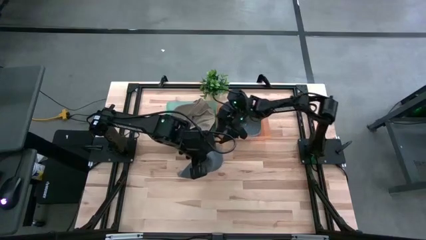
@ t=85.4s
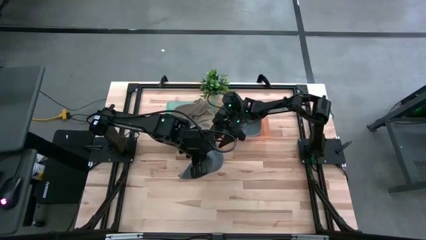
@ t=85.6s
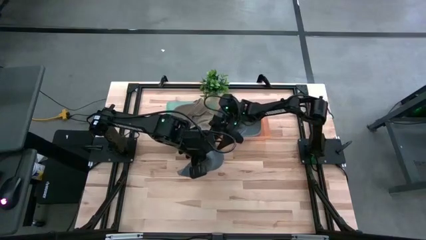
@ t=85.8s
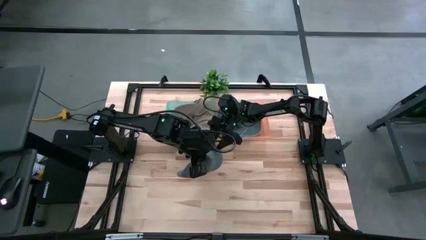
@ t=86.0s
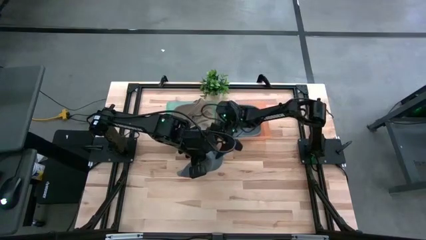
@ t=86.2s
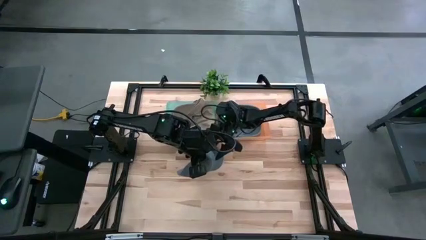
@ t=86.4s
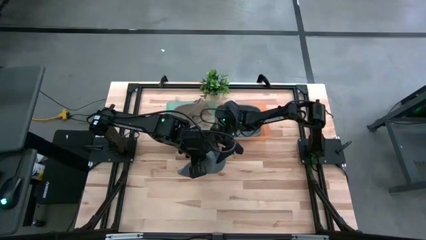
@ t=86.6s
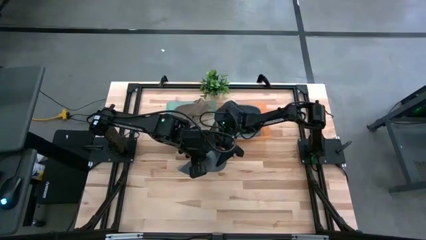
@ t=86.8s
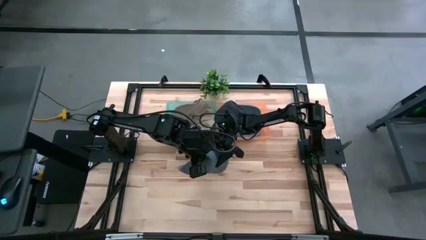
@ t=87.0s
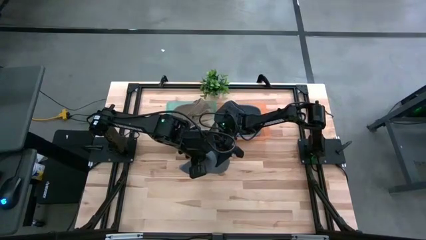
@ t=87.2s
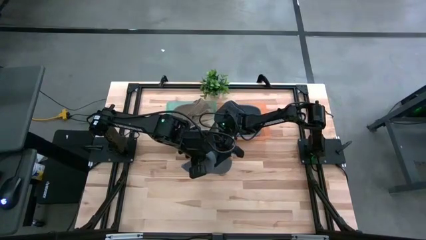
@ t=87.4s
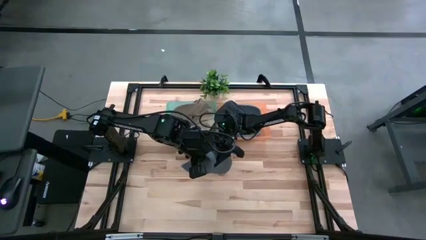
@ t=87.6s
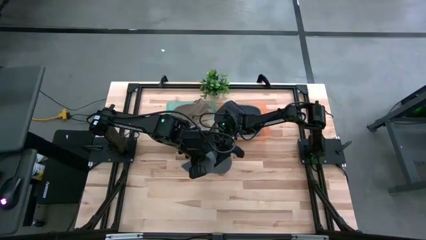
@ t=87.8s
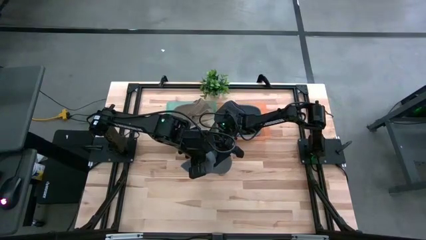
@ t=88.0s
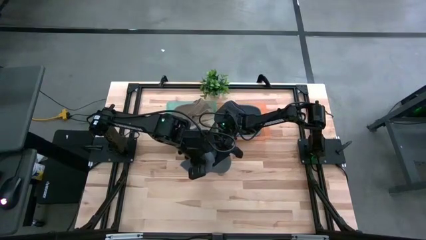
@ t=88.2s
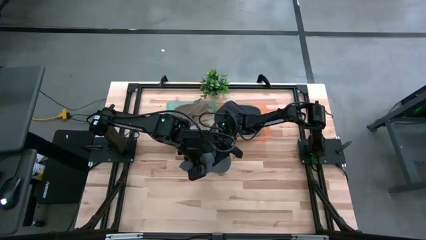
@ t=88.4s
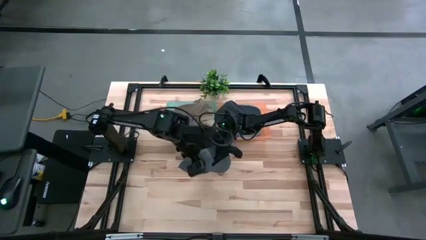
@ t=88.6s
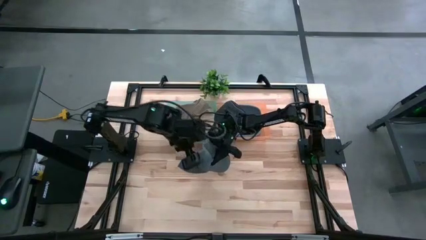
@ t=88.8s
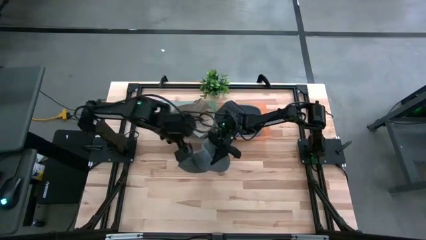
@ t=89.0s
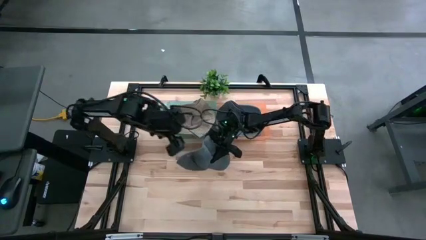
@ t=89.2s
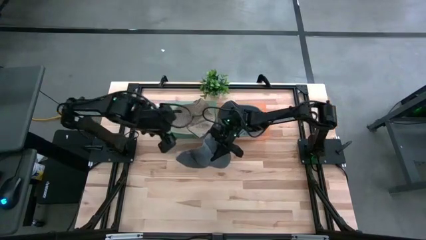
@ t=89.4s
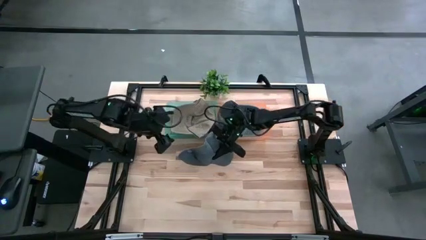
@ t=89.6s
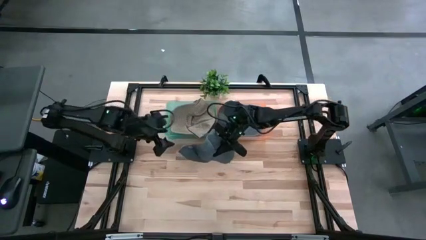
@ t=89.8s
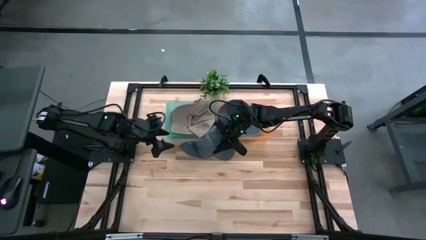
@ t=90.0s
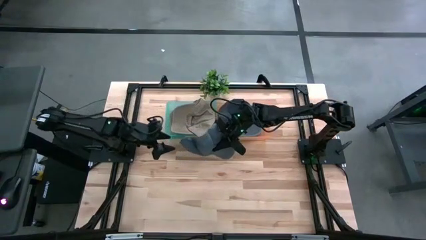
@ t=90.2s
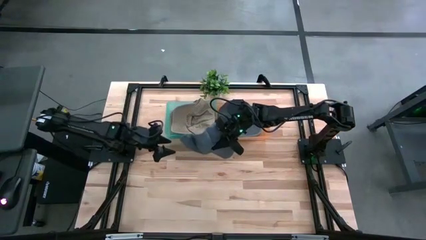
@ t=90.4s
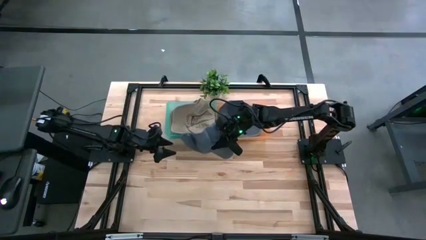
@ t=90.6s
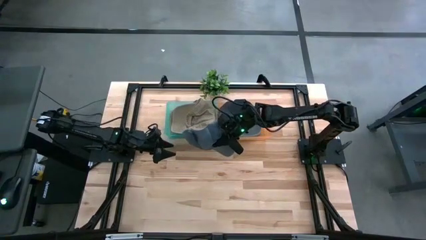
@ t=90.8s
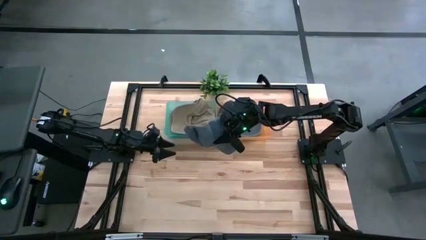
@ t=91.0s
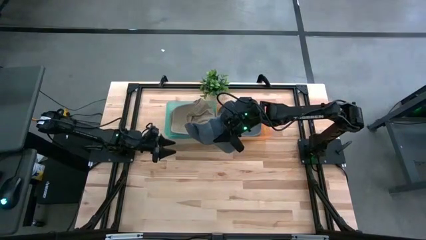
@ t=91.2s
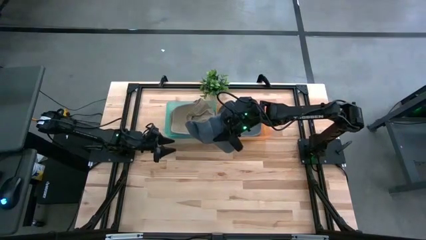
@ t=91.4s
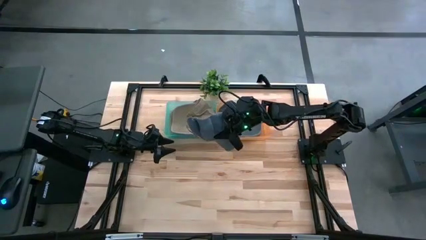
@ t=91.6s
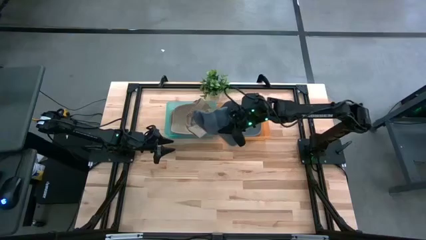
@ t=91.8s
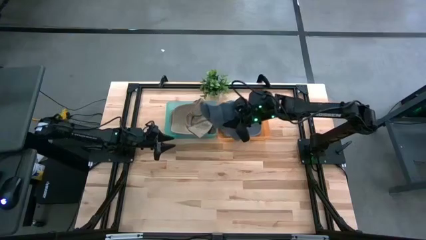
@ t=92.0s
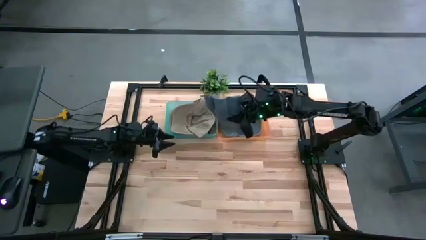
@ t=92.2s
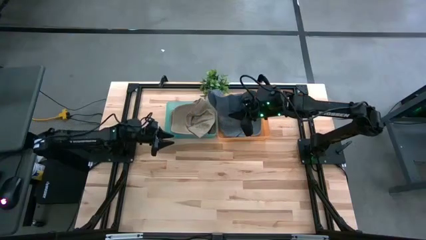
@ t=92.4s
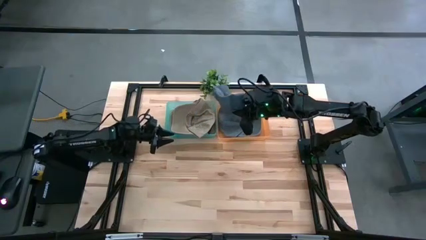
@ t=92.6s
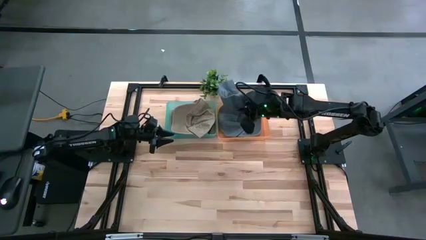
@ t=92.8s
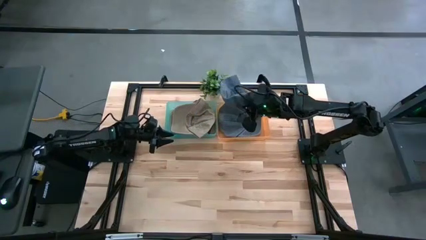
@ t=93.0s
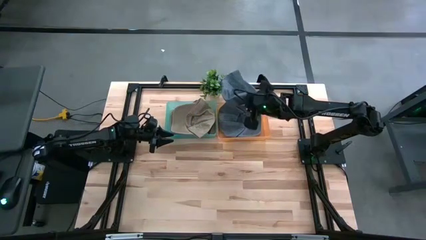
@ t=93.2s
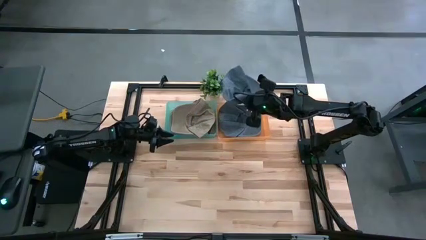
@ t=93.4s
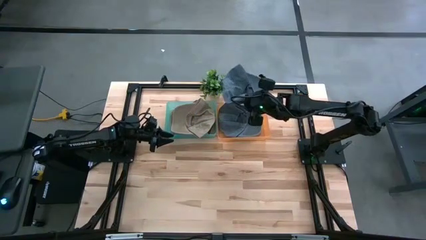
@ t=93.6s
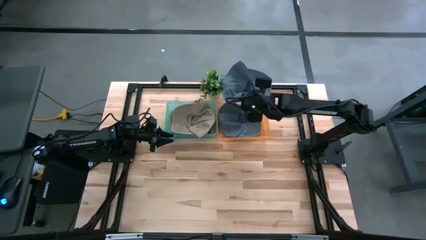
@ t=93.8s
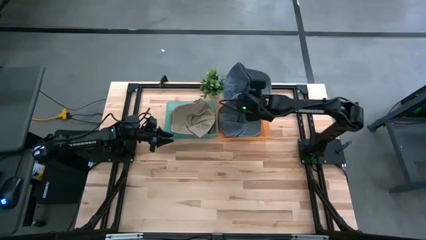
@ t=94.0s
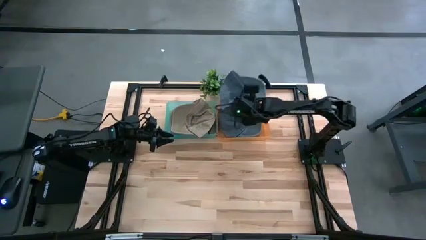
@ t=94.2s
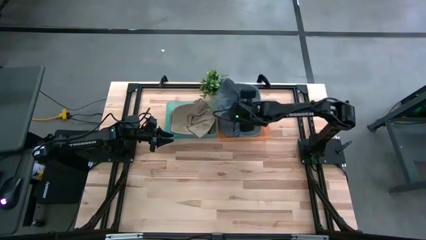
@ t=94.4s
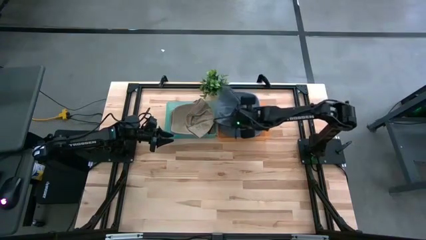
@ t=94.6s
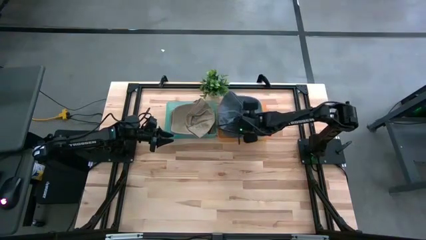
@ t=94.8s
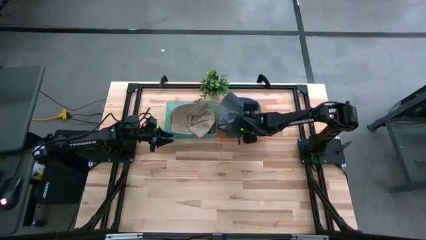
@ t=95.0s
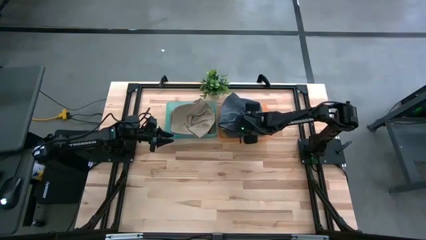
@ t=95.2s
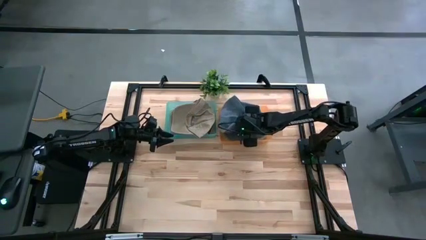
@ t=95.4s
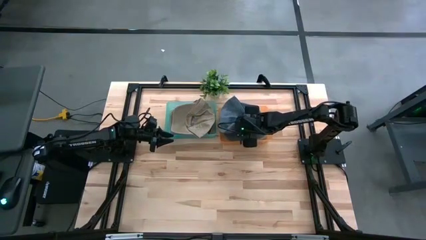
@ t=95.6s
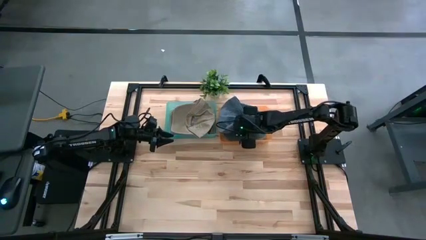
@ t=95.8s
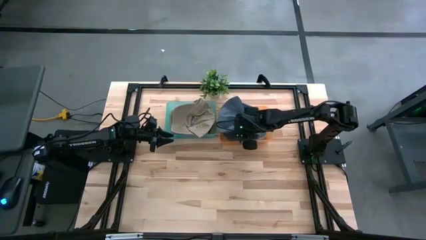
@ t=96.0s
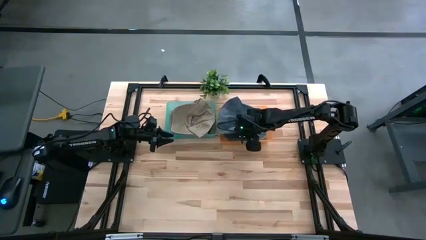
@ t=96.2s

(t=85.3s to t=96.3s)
Task: Pick & Place hat
Put the blue cap into the orange bin

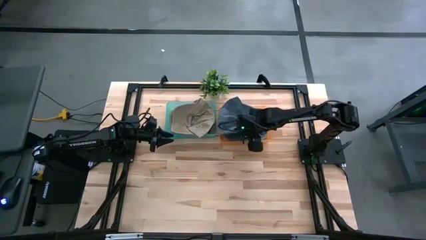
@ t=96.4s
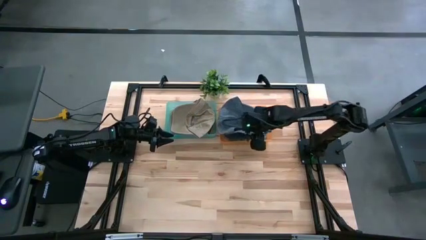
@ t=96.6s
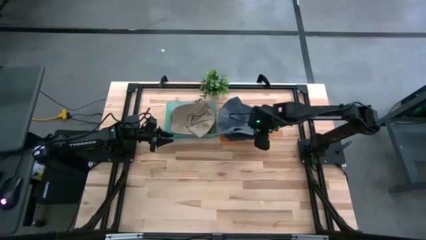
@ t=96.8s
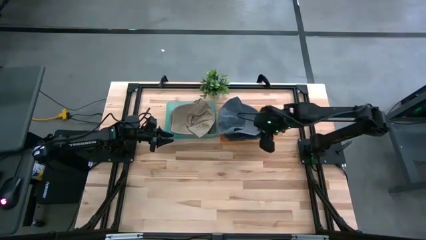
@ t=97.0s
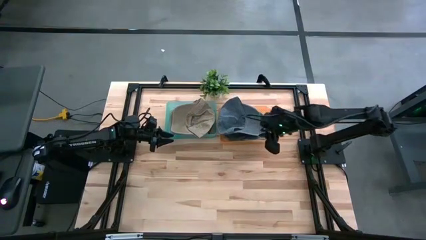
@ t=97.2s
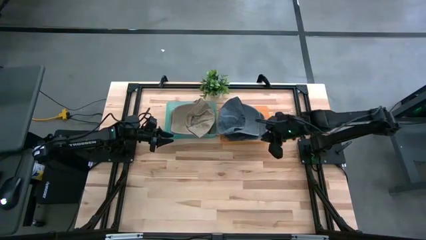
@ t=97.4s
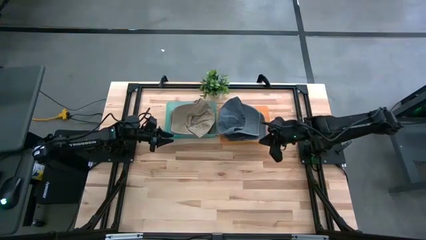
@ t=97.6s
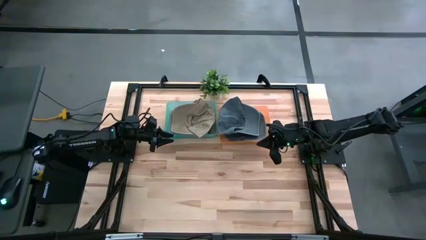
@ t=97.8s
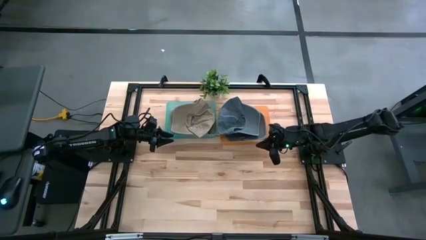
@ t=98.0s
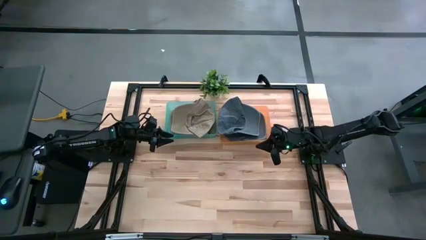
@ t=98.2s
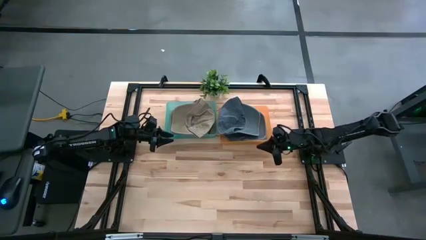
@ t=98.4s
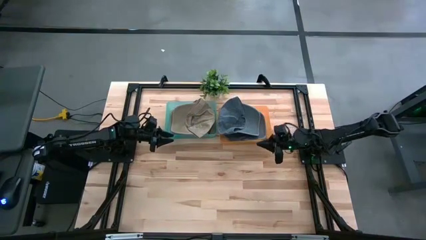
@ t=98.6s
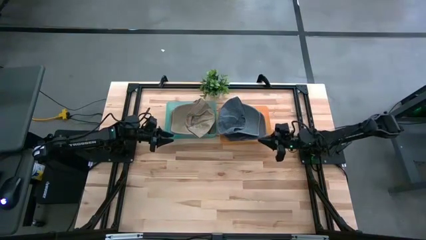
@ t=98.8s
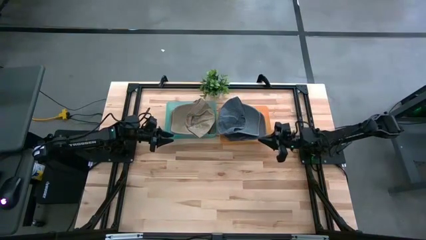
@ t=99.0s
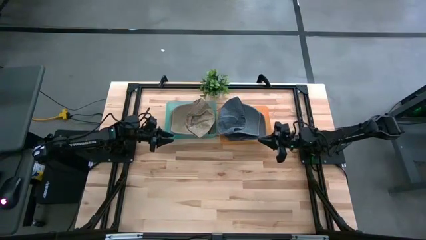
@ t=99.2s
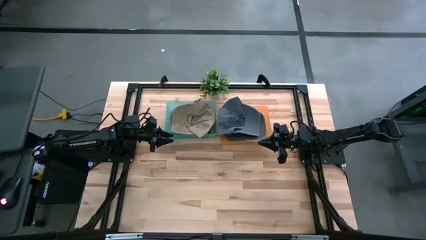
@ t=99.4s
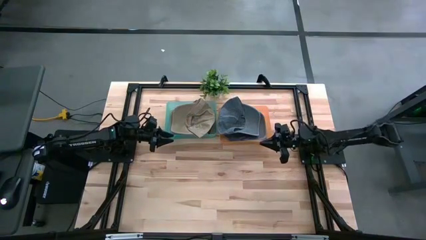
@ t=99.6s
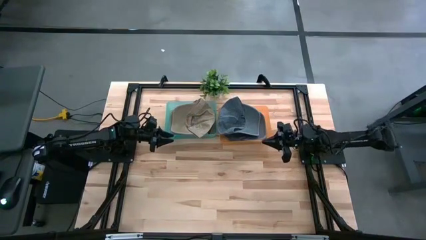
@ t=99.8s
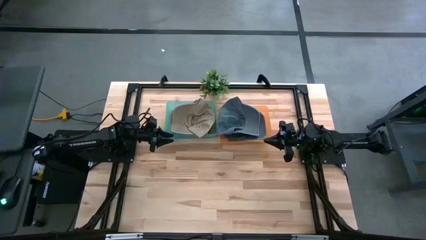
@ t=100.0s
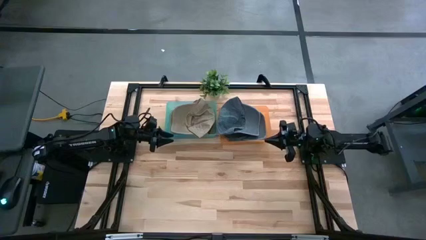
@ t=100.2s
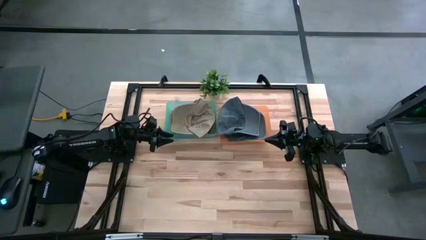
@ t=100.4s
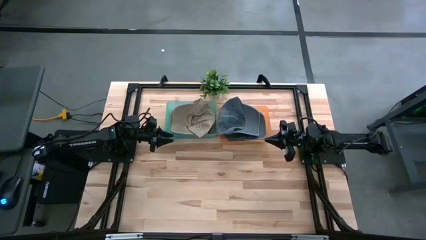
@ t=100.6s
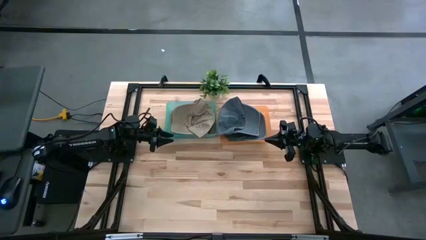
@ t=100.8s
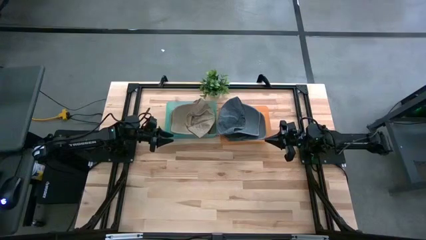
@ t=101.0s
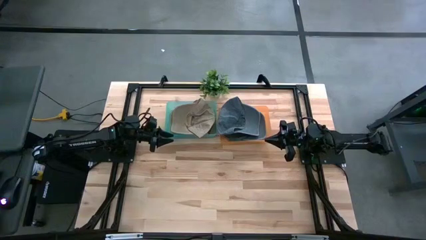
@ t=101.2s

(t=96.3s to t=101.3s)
Return to Home Position
